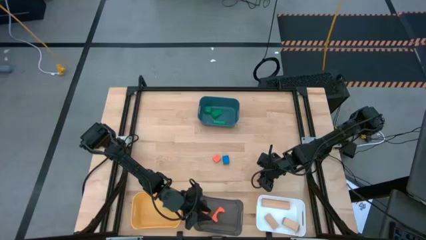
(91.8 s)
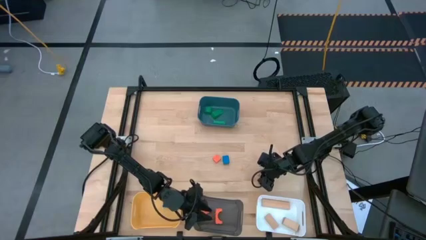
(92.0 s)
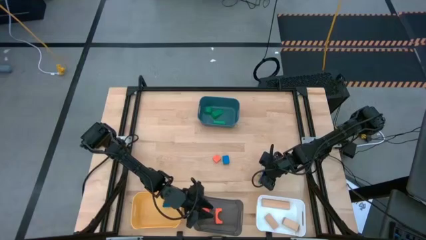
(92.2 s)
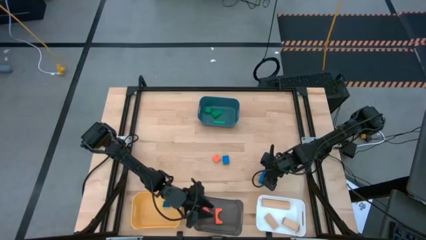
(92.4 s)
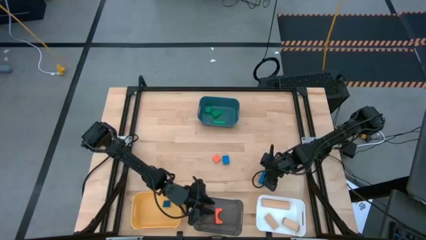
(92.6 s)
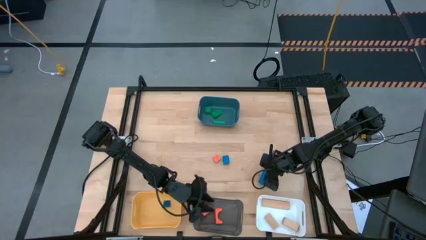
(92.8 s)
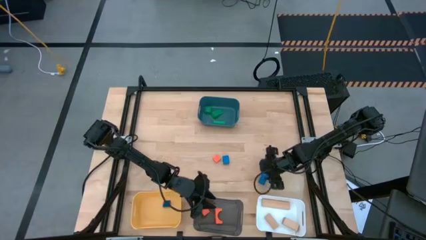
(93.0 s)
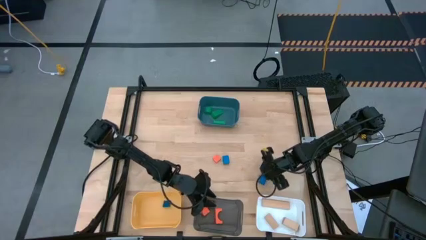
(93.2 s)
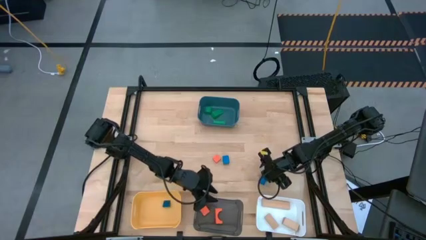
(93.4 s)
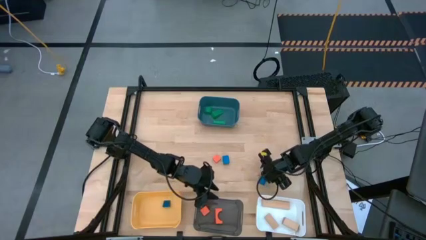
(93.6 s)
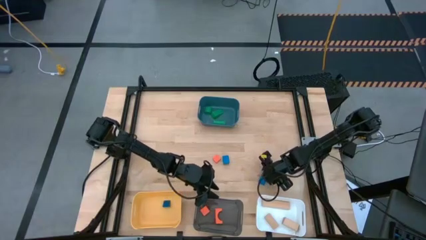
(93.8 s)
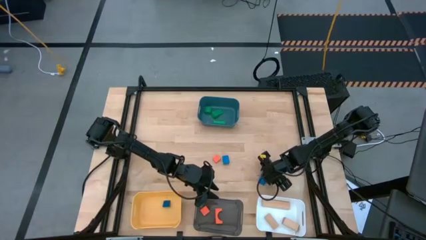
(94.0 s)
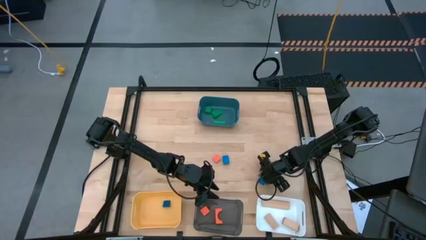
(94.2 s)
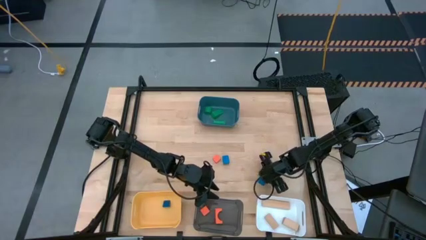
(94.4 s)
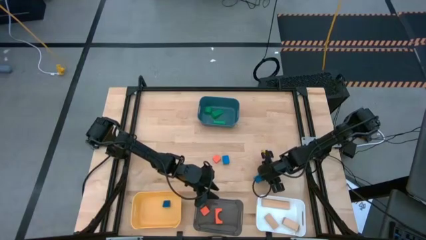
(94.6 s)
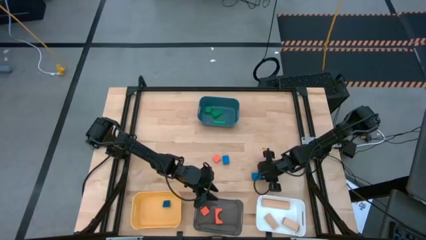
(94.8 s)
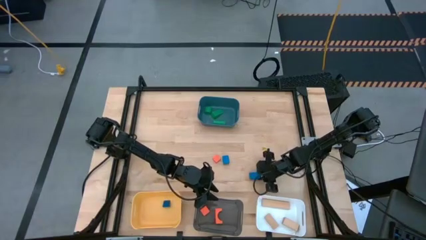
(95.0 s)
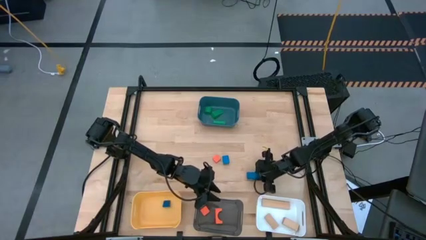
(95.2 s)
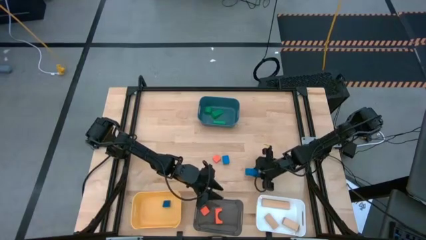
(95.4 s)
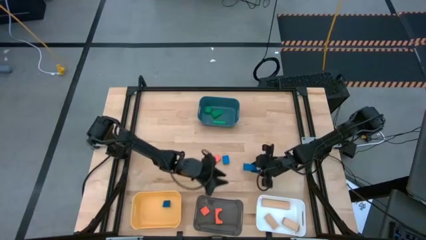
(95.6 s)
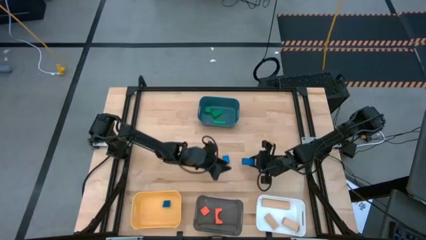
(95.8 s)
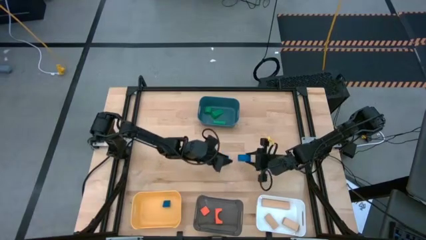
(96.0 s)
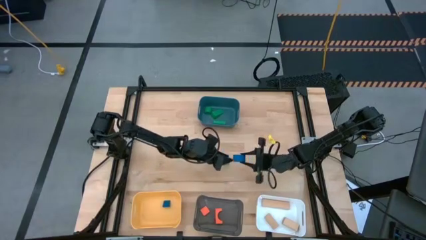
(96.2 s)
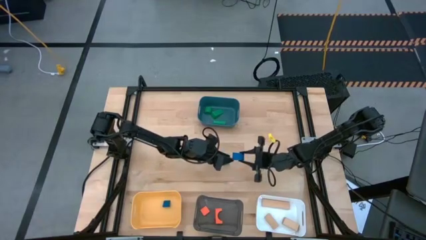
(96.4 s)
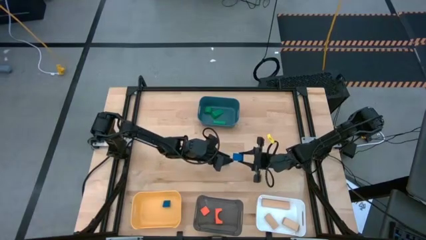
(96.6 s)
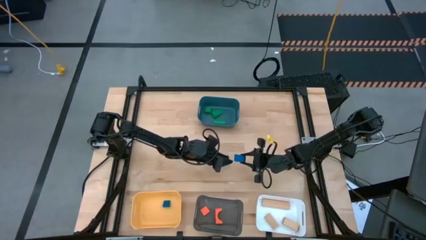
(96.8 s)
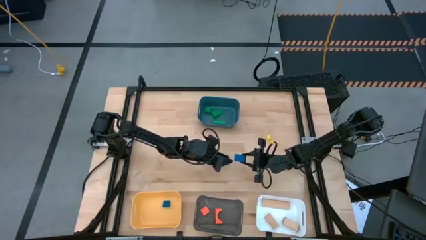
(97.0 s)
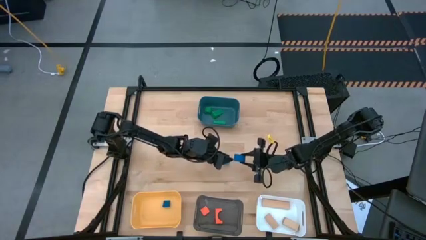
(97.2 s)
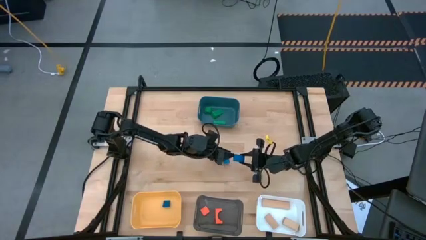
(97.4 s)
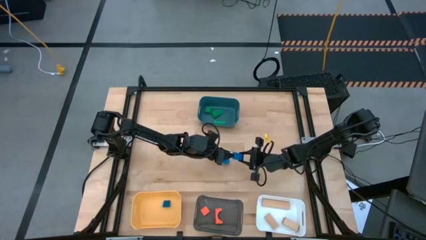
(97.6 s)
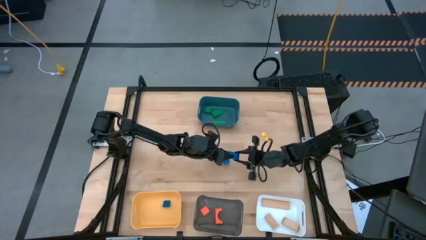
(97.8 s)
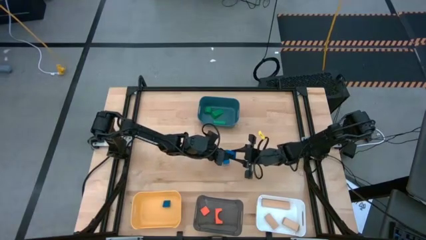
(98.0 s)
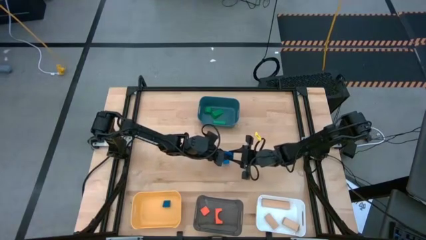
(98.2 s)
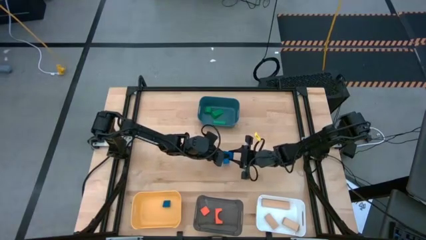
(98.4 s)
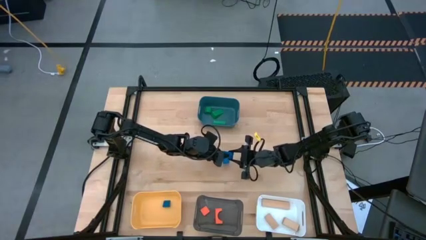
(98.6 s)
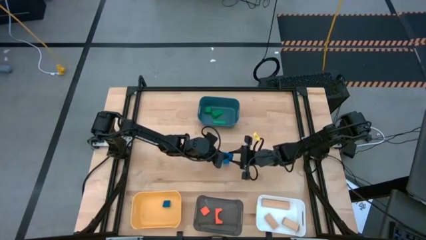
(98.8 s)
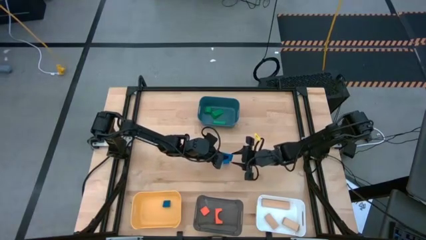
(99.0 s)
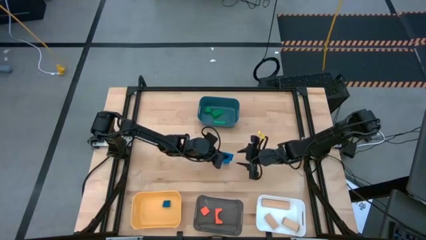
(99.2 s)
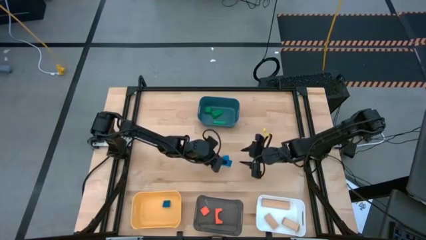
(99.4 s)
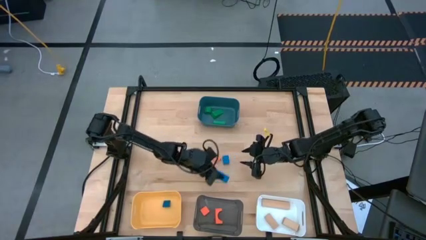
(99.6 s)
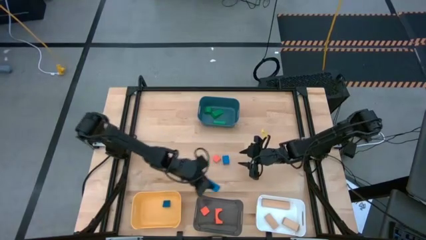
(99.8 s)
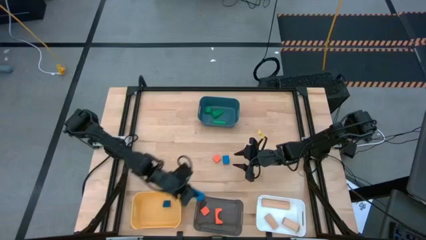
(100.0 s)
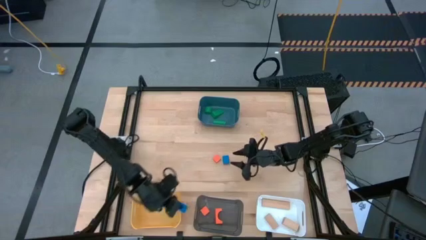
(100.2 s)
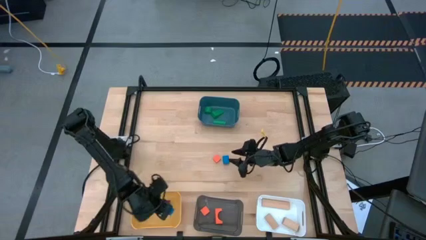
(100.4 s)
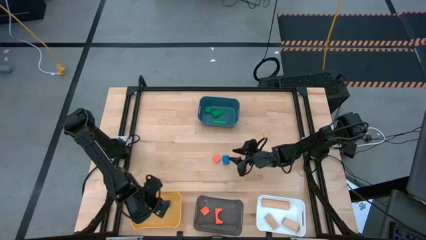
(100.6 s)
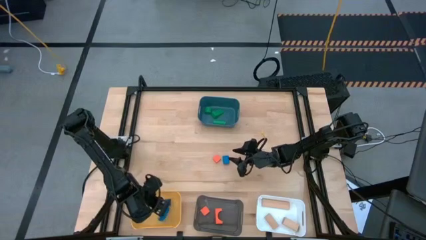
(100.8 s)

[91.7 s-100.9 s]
Task: Sort & place blocks by color
Put the bottom blue block into the yellow bin

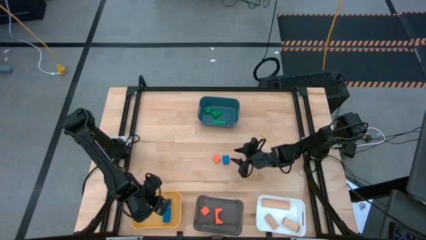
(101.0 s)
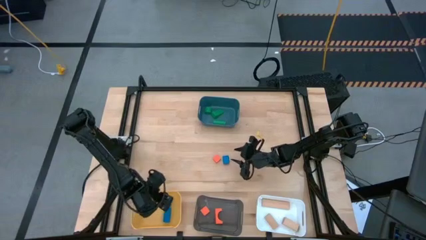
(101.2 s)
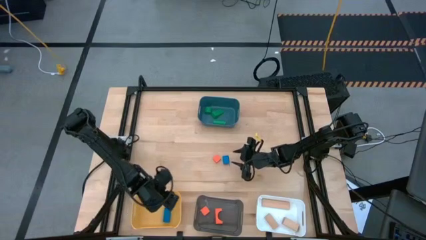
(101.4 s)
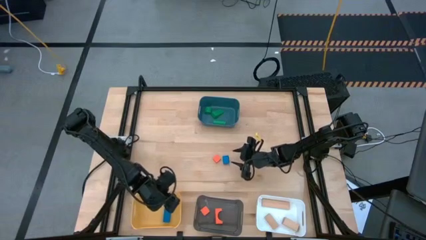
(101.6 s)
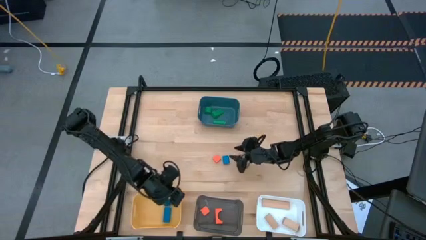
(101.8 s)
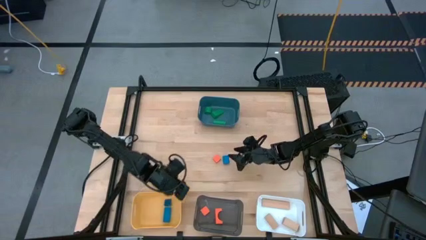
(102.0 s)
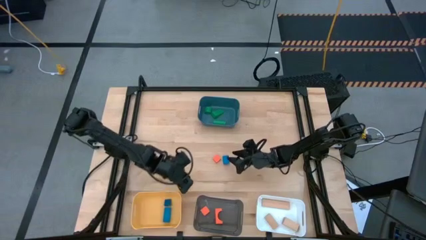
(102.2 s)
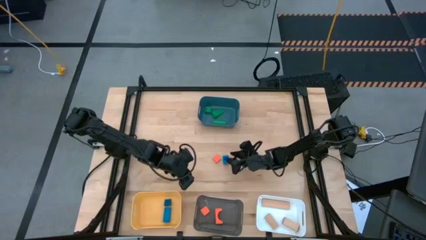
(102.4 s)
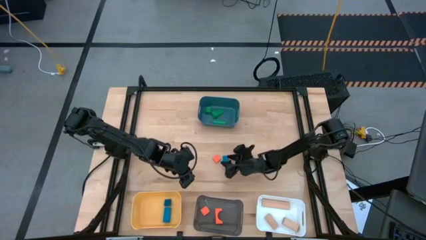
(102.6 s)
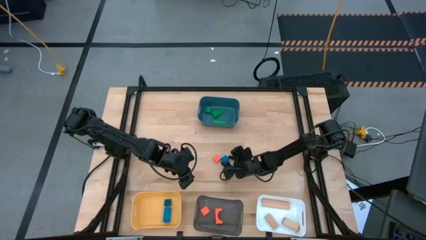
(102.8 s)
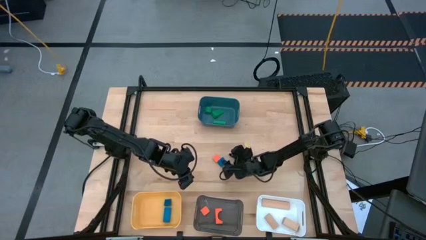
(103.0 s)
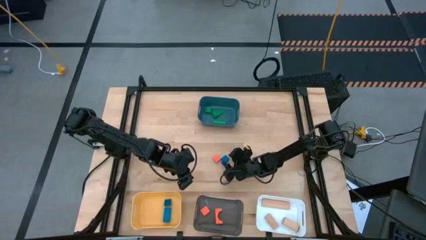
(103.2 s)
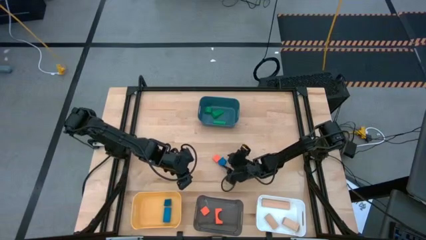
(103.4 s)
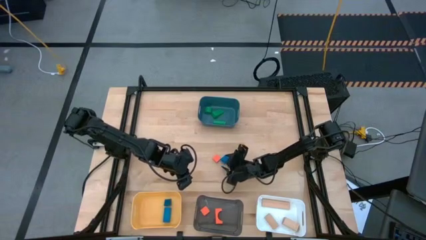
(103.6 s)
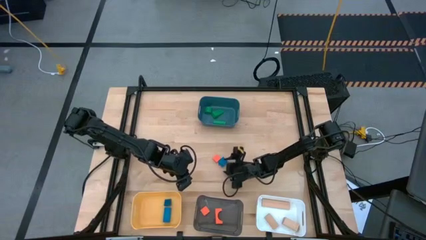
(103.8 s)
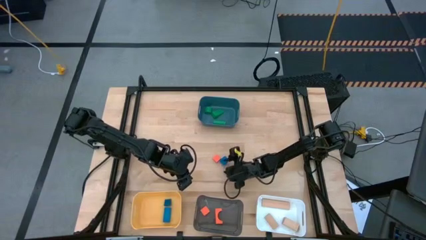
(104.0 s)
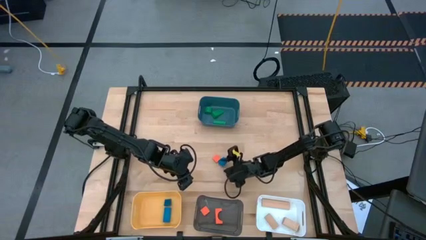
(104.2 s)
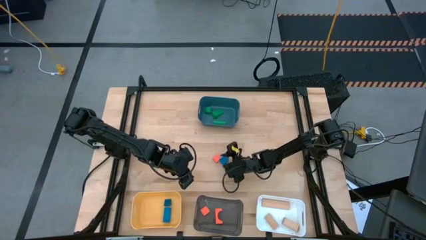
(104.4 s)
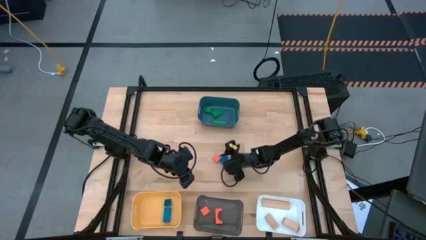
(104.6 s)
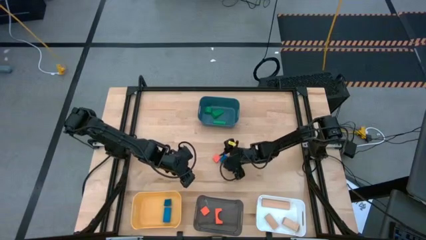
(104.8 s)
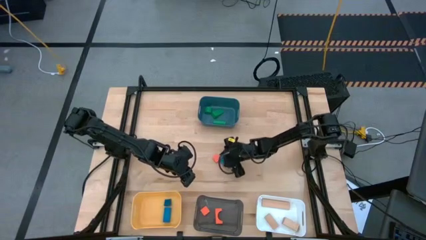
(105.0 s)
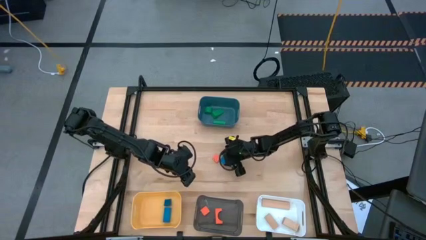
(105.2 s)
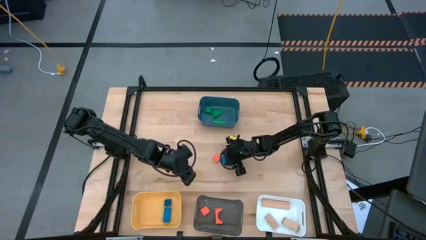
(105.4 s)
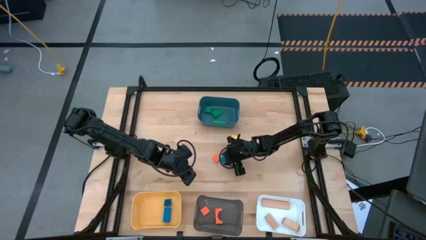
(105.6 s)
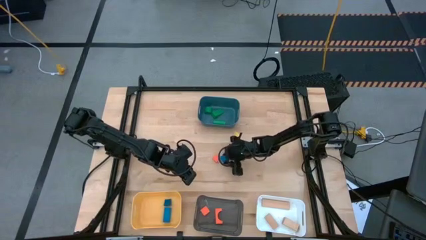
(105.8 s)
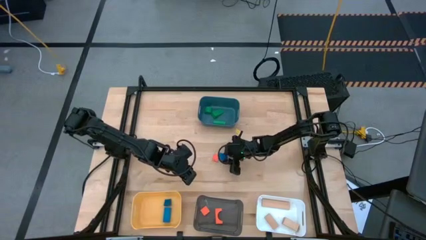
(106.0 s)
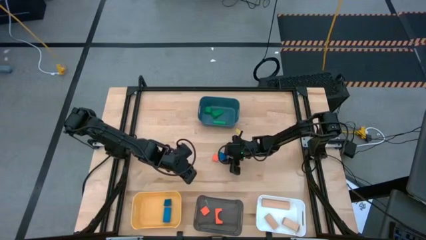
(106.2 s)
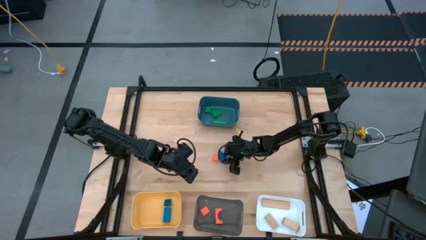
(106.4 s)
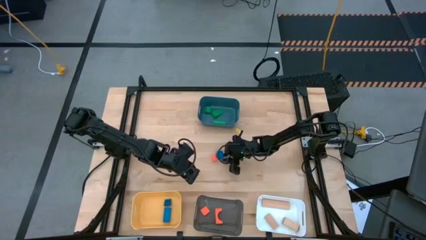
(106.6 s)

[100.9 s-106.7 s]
Put the blue block into the yellow bin

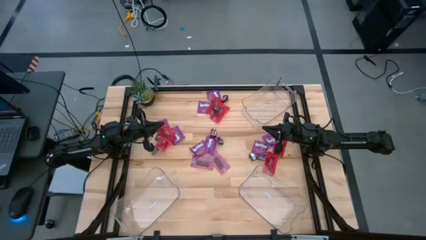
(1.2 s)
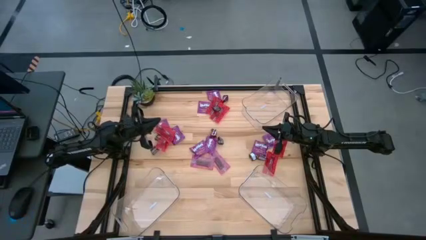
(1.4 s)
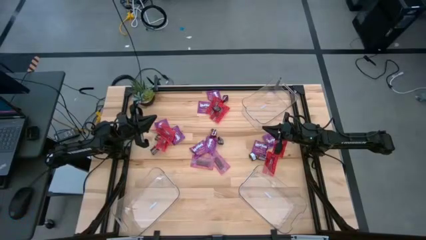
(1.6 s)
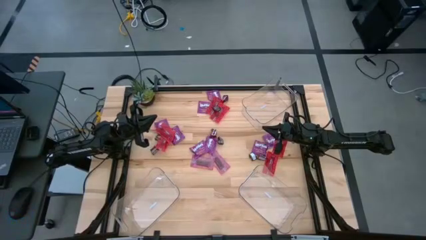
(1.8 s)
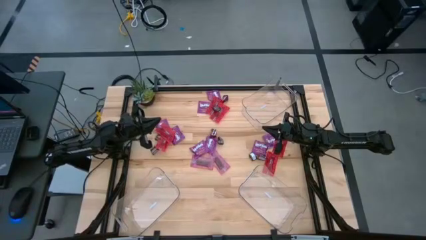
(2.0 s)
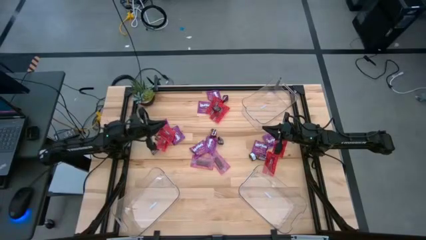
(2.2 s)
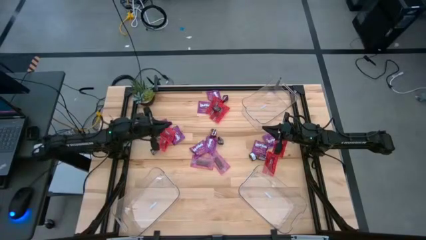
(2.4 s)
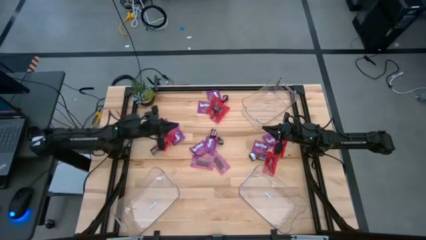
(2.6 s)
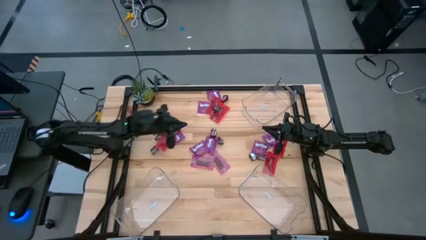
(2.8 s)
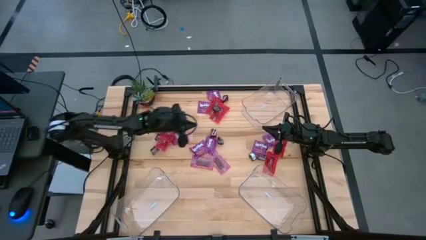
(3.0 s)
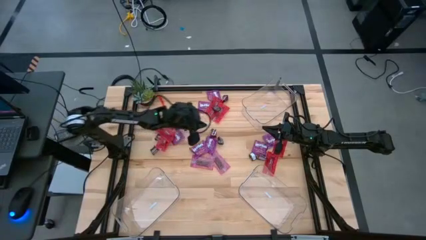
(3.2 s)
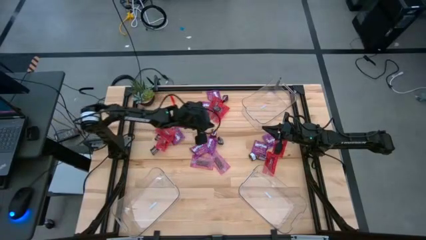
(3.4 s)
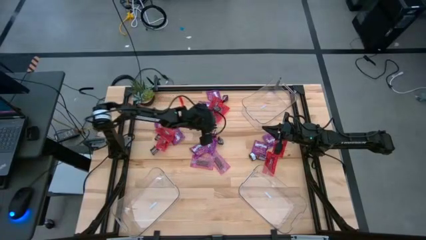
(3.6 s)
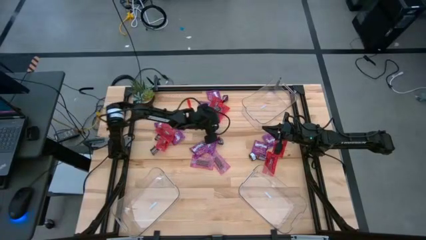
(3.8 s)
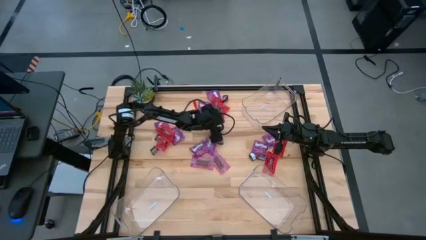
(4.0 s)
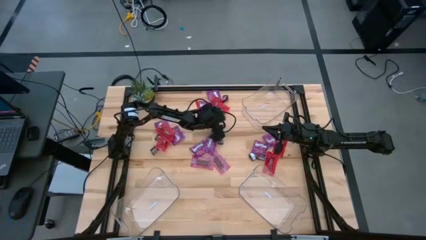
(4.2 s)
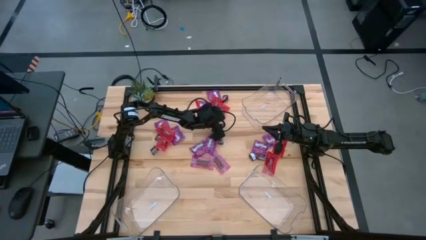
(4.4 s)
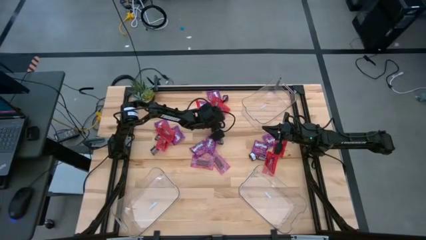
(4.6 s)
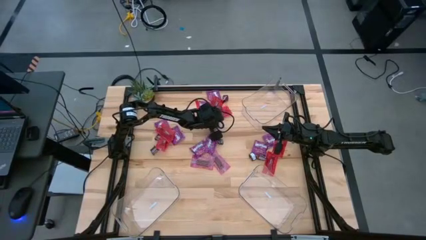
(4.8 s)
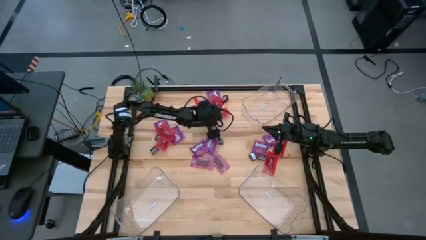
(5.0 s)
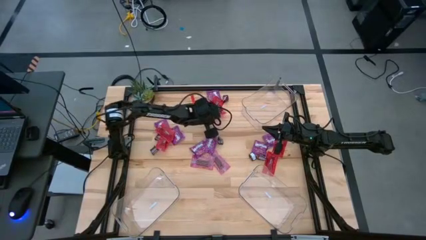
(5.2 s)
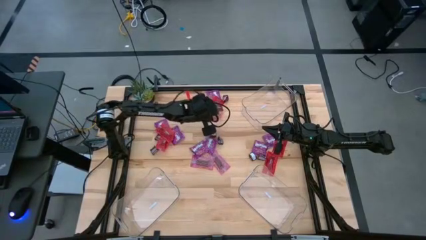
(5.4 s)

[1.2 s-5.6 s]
Task: Sort candy
Put the red candy into the top transparent bin
